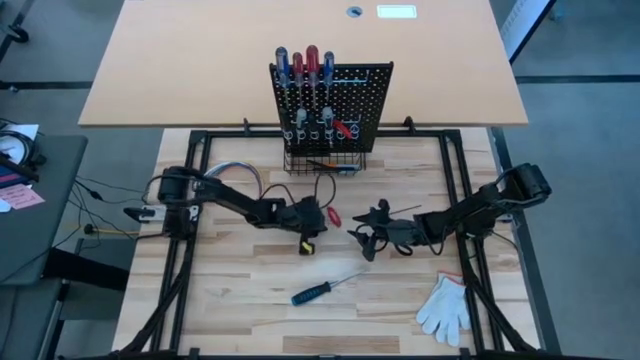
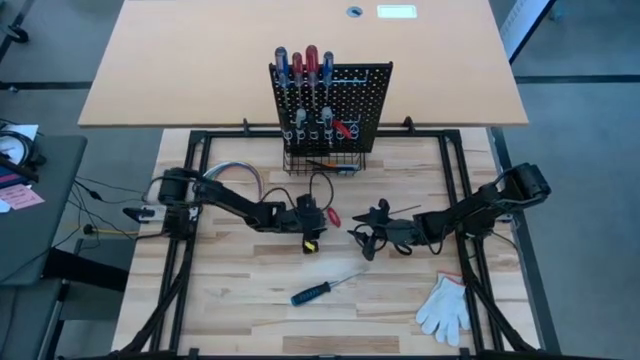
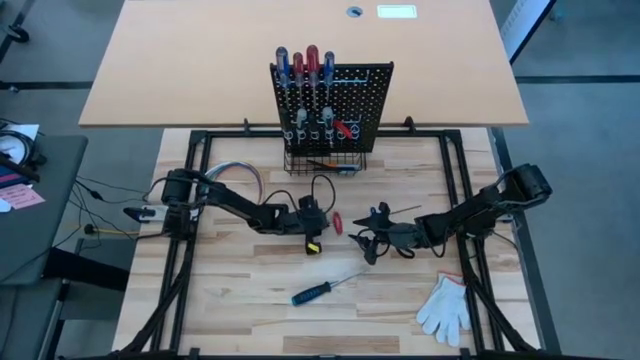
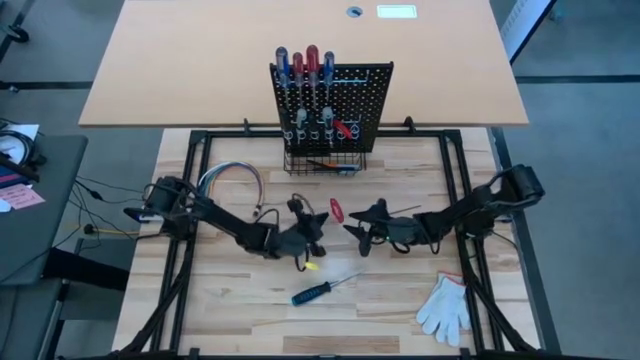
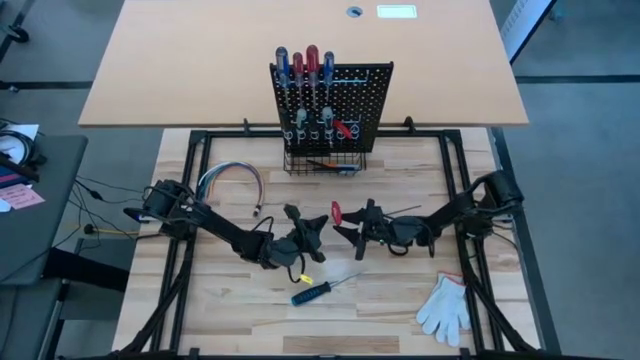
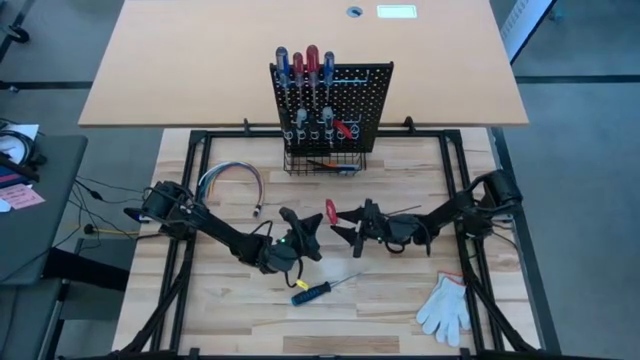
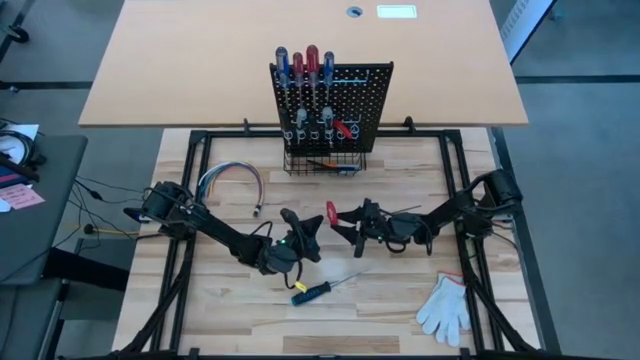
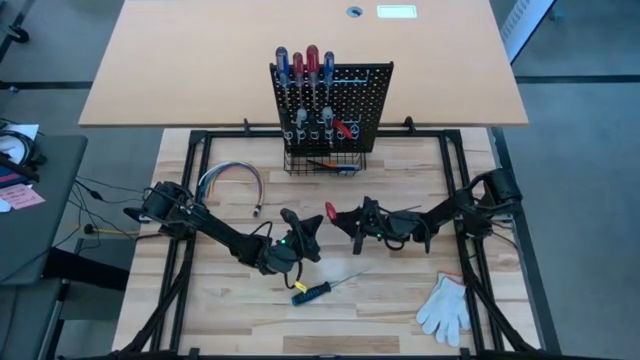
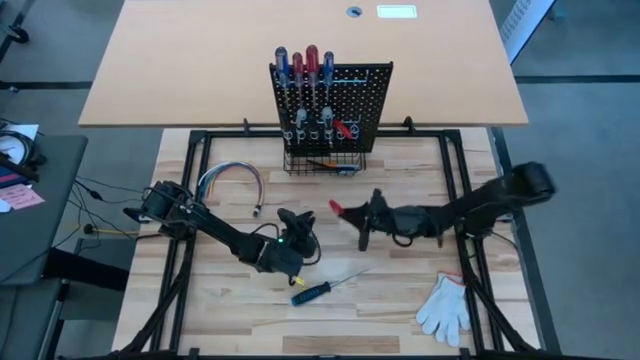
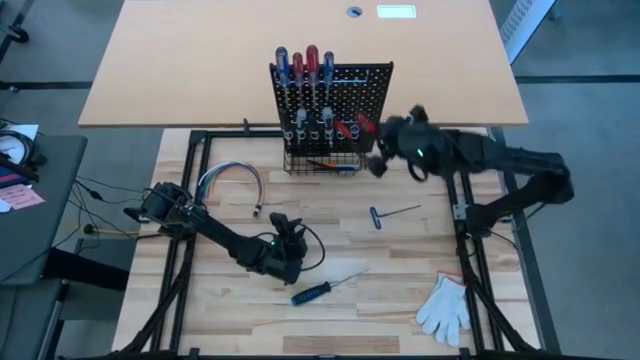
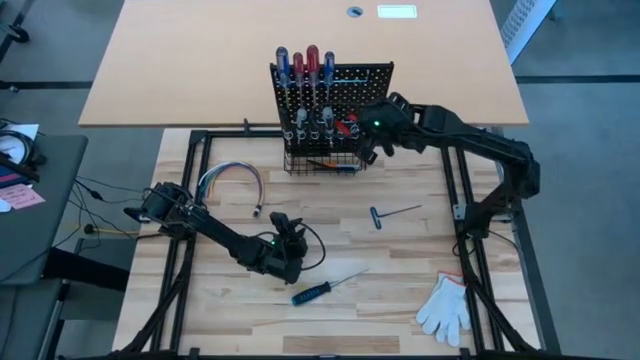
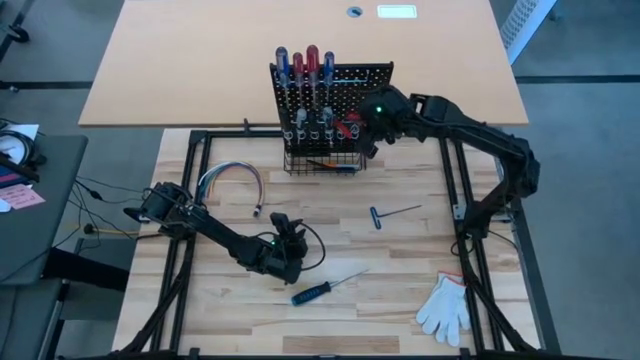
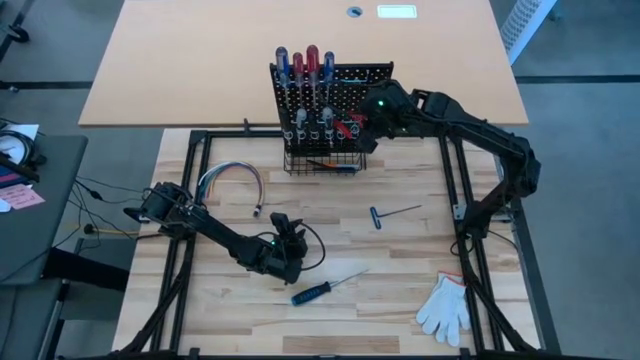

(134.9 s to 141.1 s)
Task: Hang tools onto peg board
Hang the red allen wrench on the pegboard

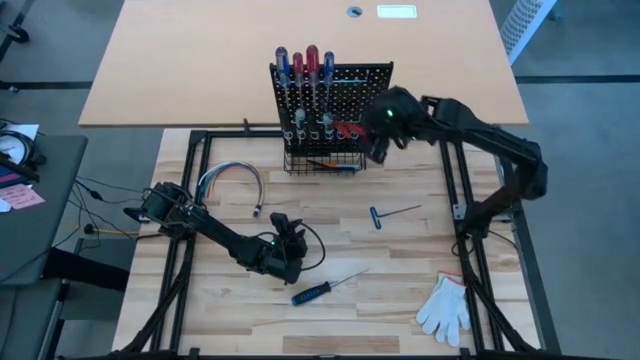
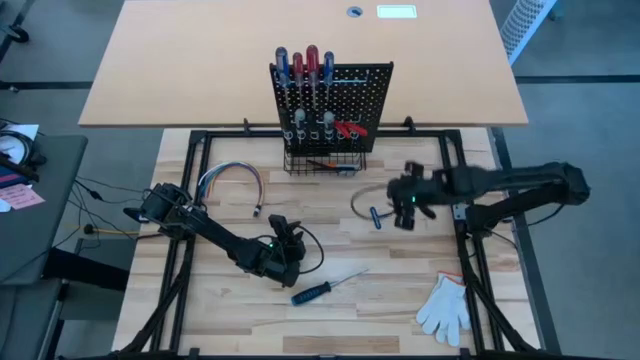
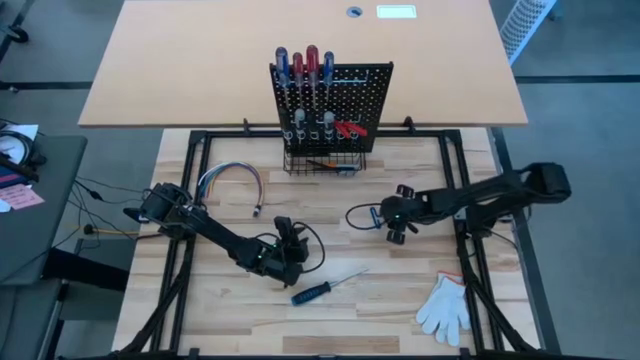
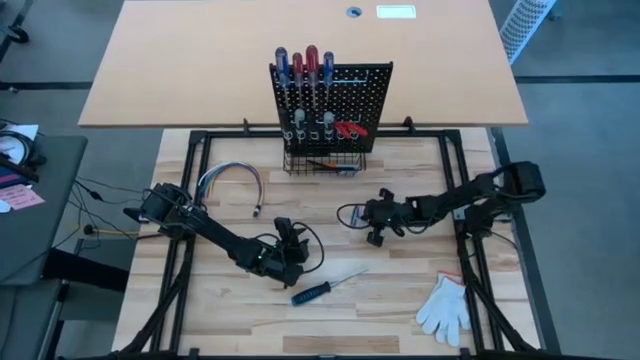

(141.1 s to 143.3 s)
Hang the blue pick tool on the pegboard

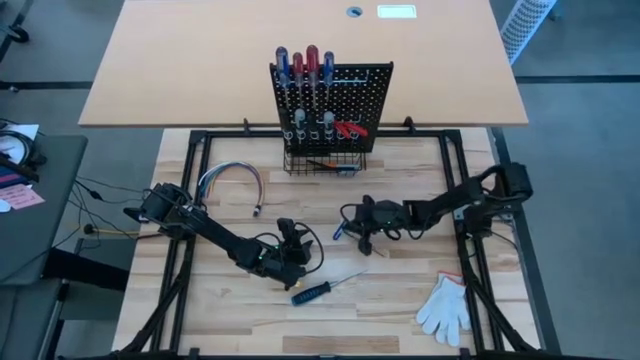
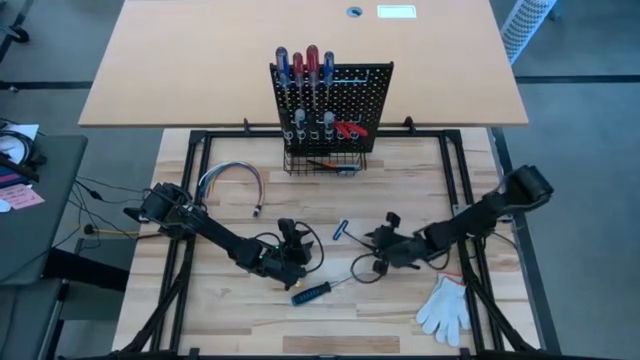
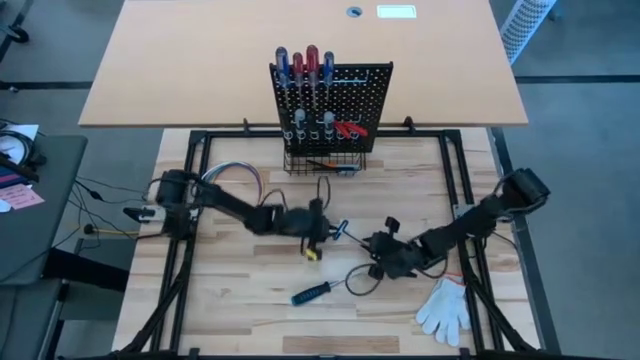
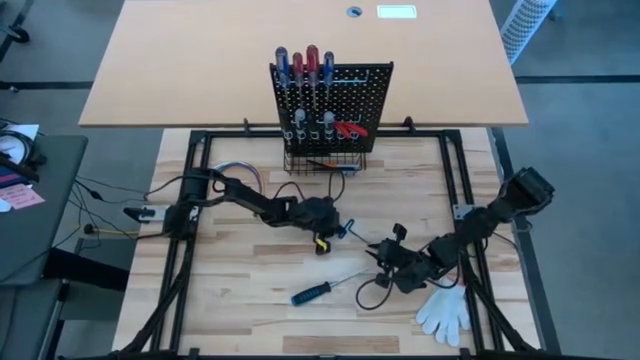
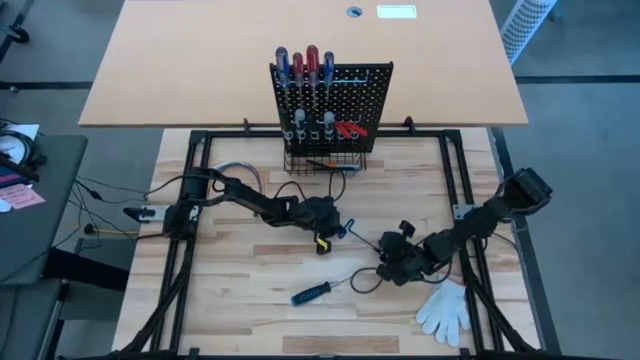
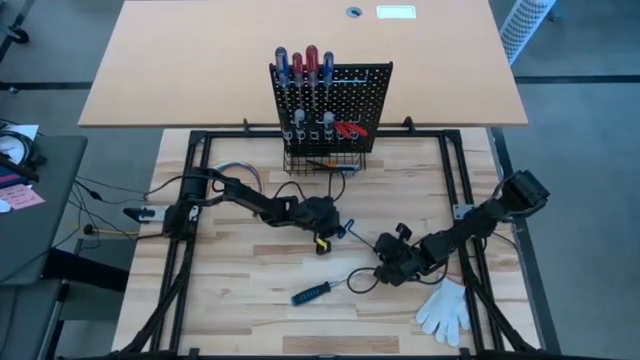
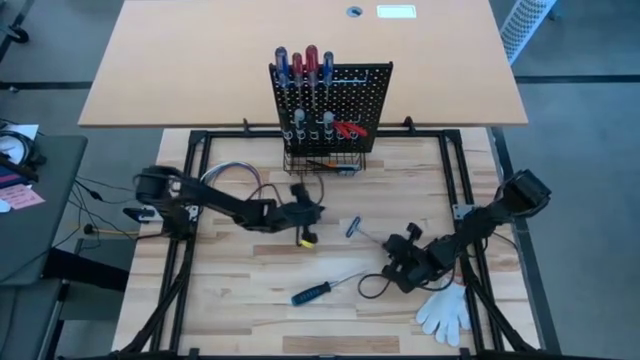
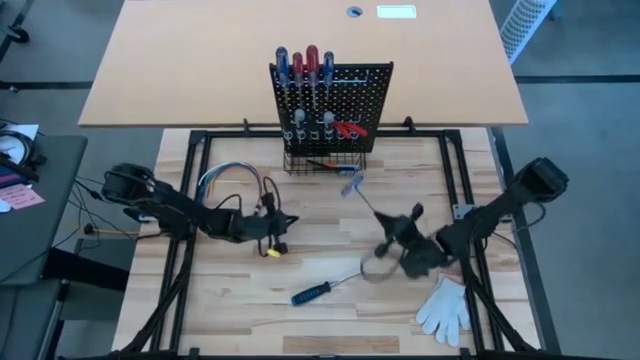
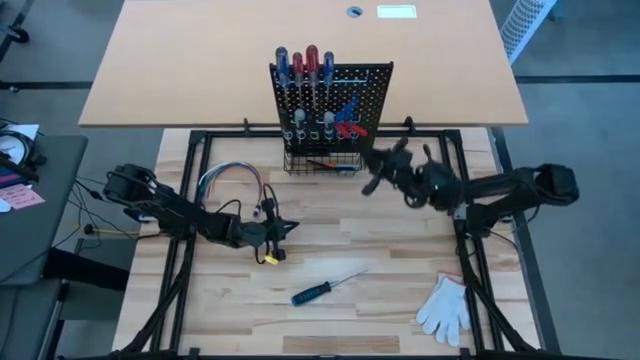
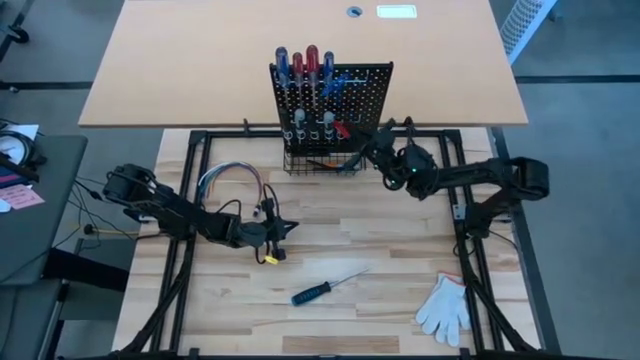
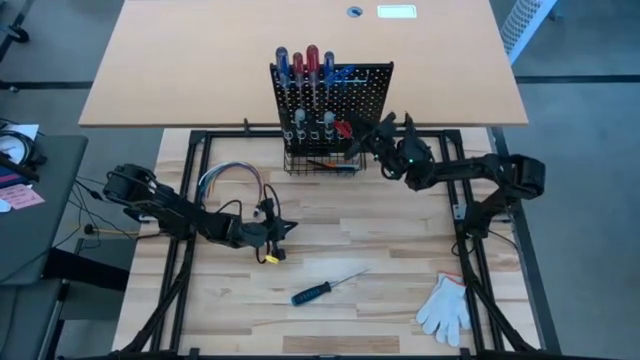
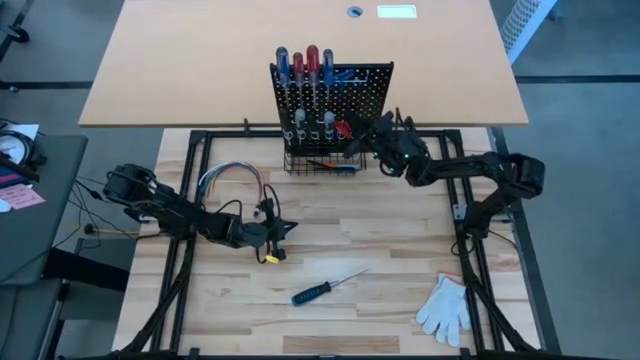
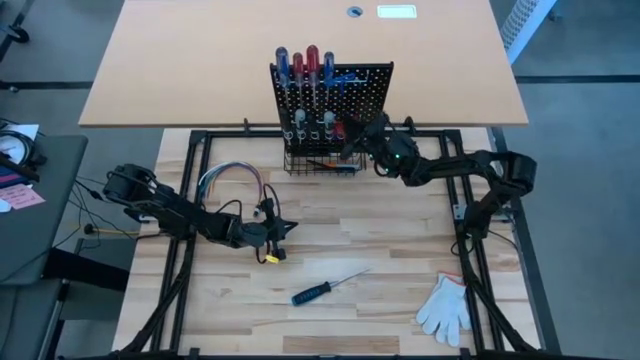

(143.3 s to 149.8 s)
Hang the blue pick tool on the pegboard

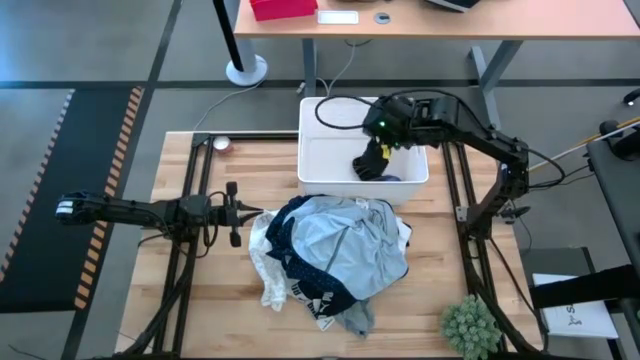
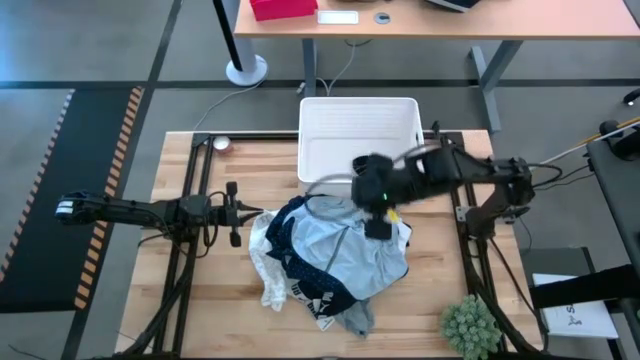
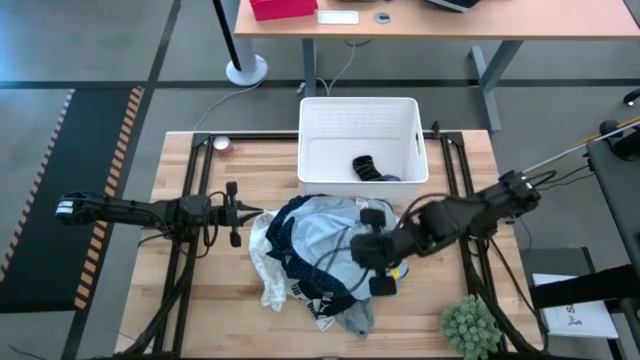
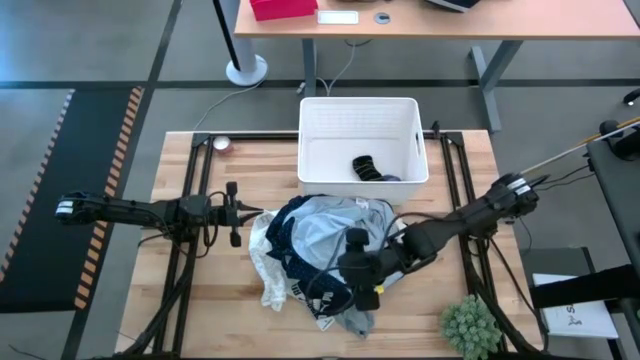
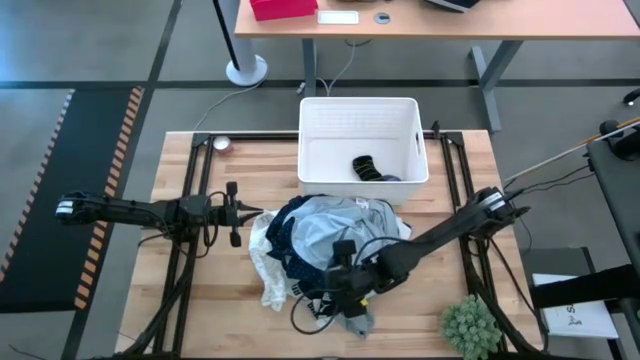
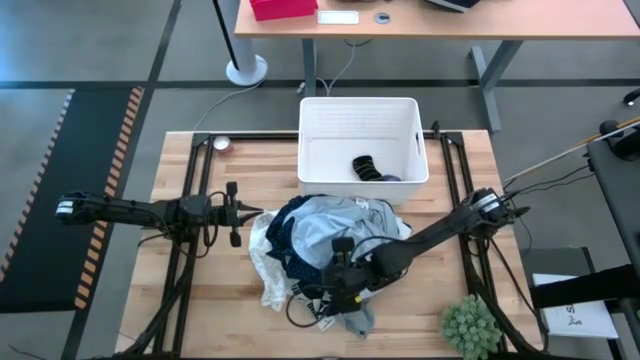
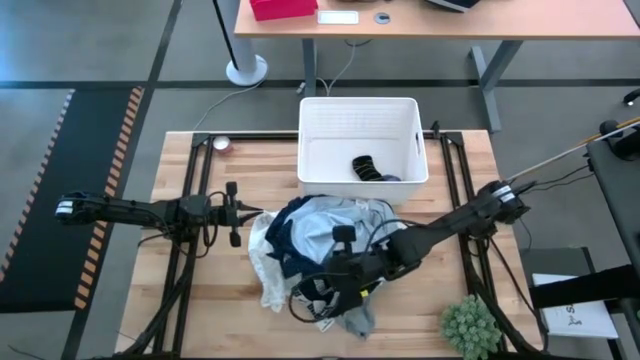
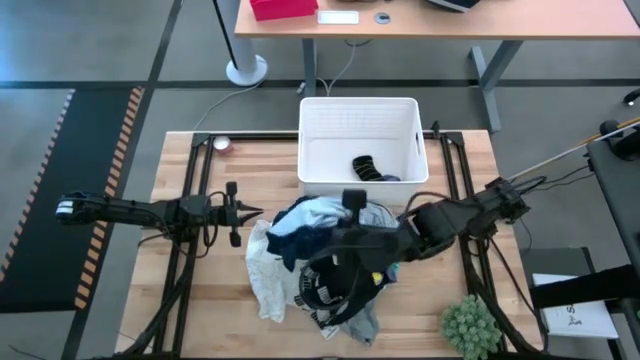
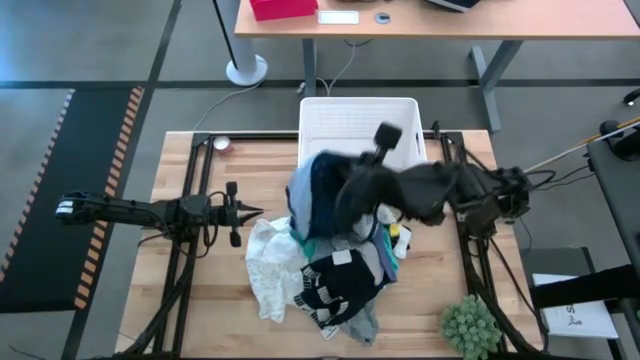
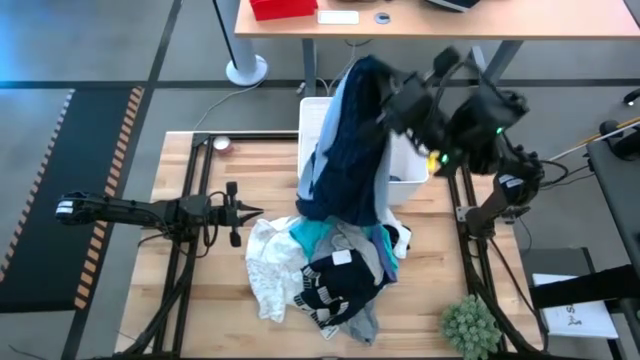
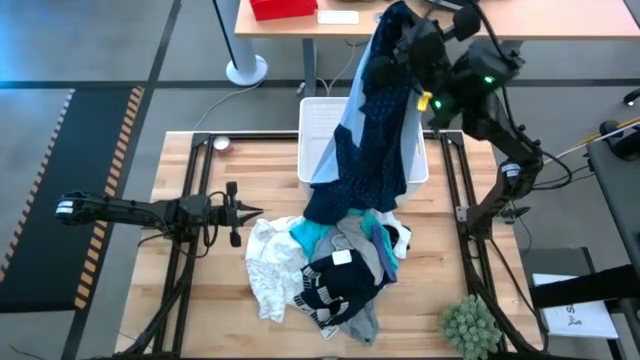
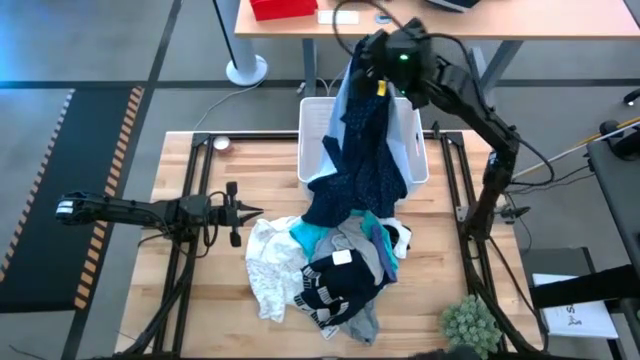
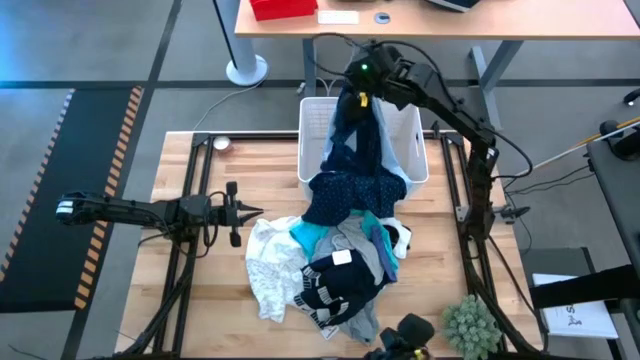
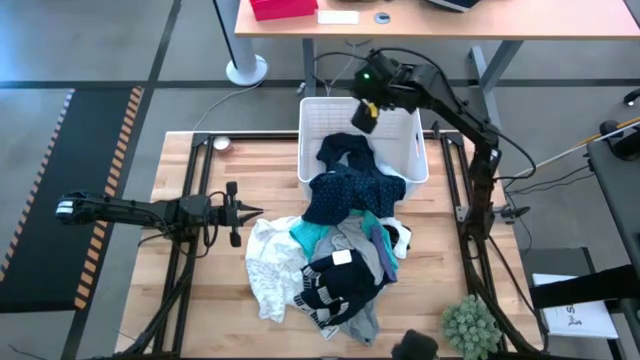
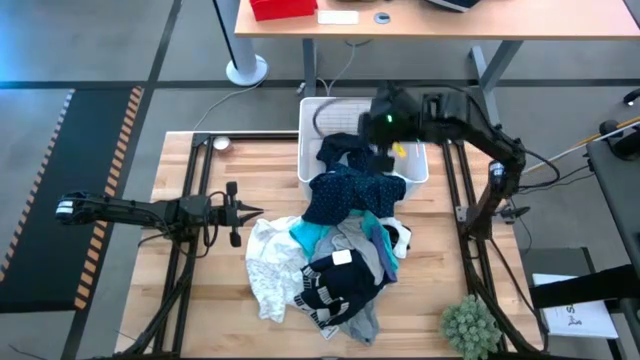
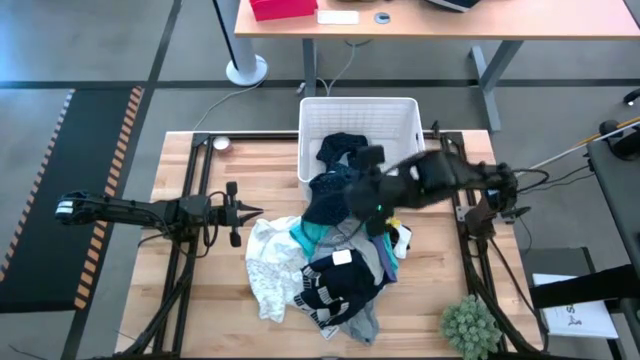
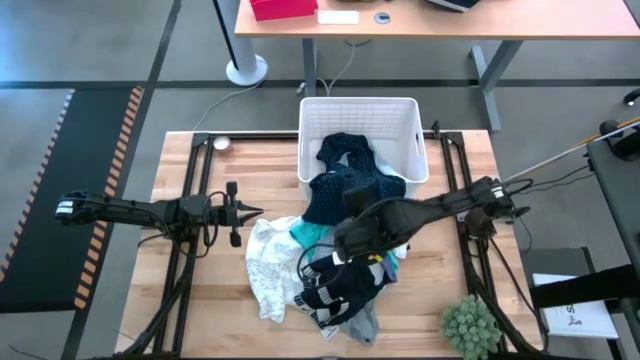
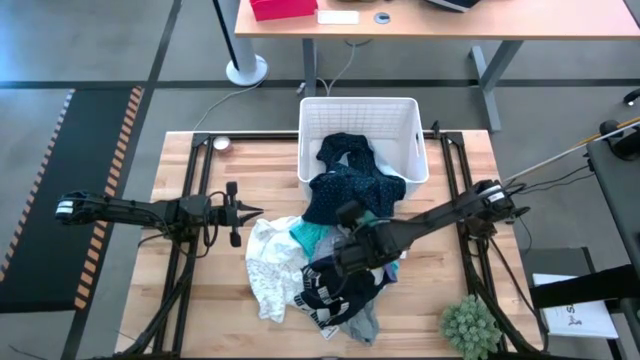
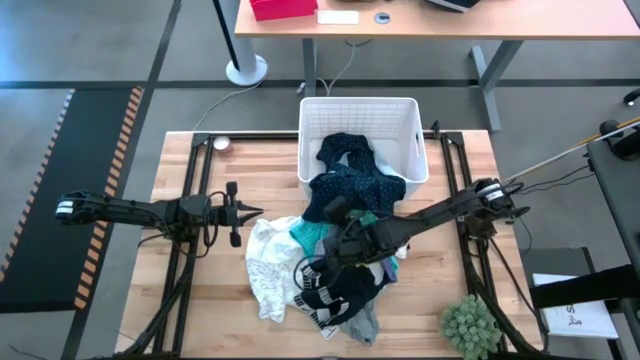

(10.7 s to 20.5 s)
Task: Sort clothes
Put the blue polo shirt into the white laundry bin
